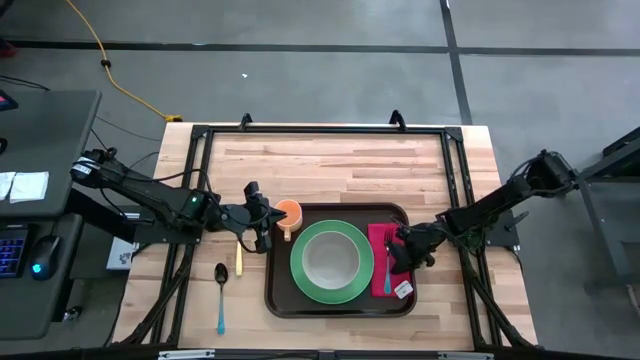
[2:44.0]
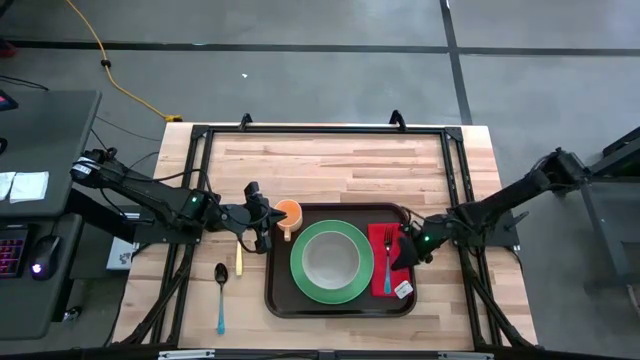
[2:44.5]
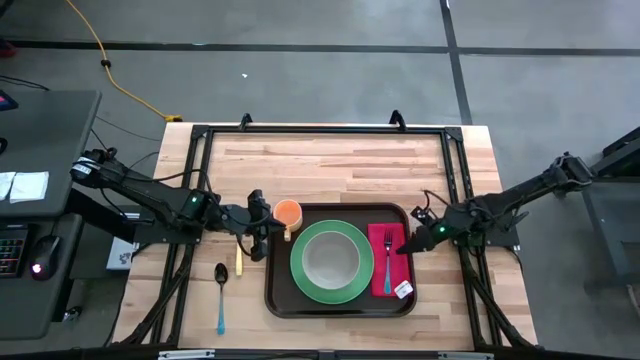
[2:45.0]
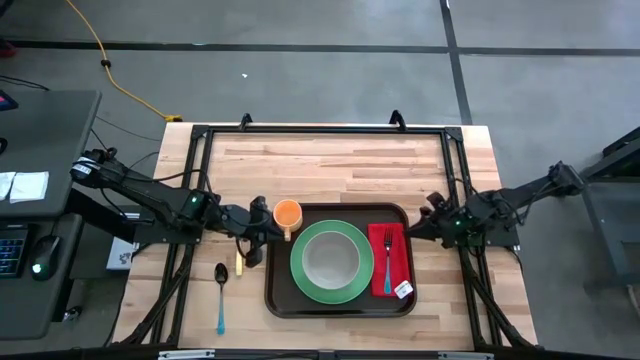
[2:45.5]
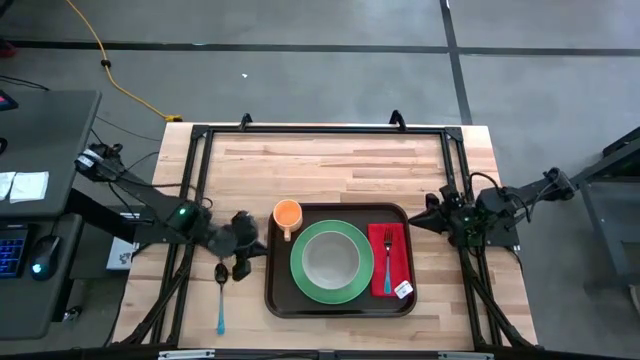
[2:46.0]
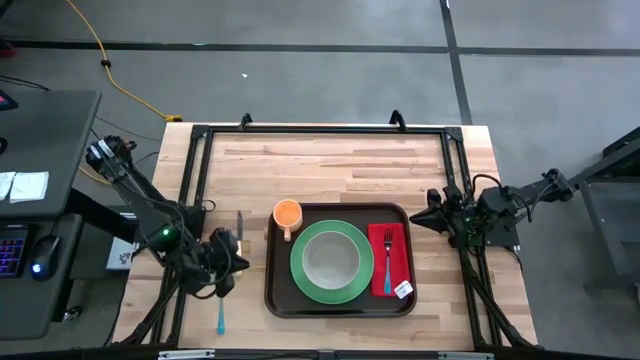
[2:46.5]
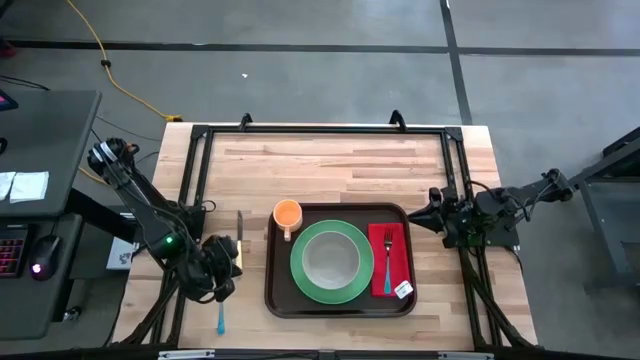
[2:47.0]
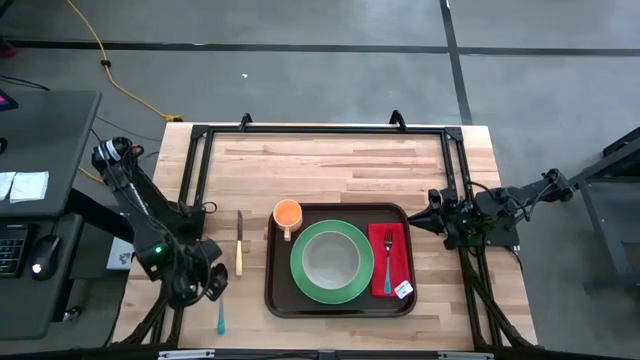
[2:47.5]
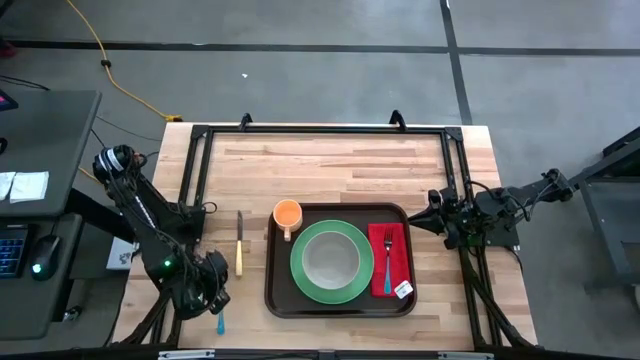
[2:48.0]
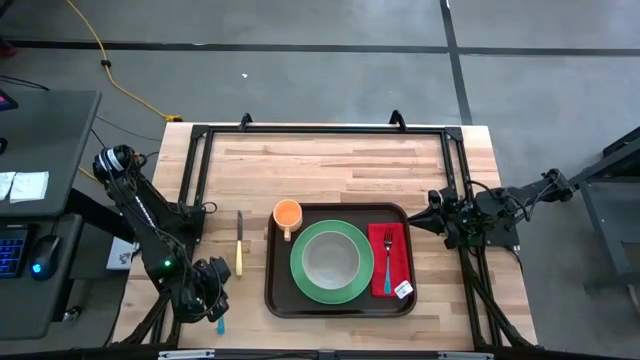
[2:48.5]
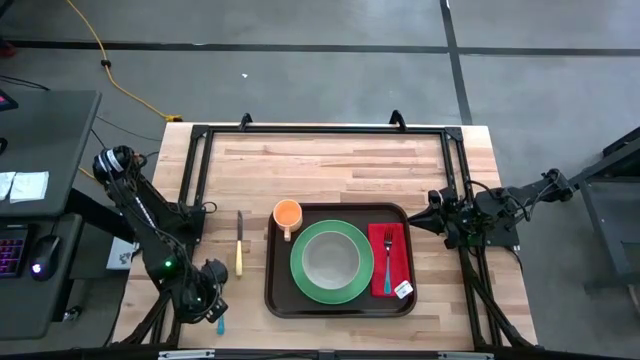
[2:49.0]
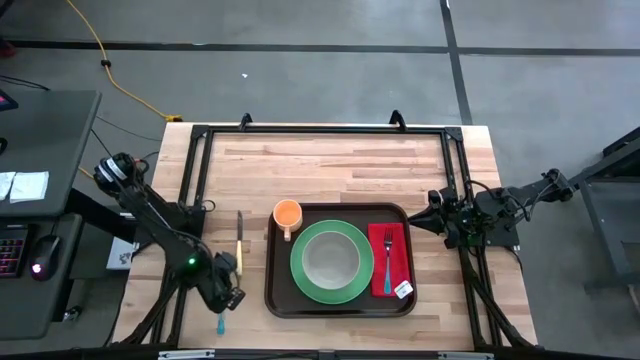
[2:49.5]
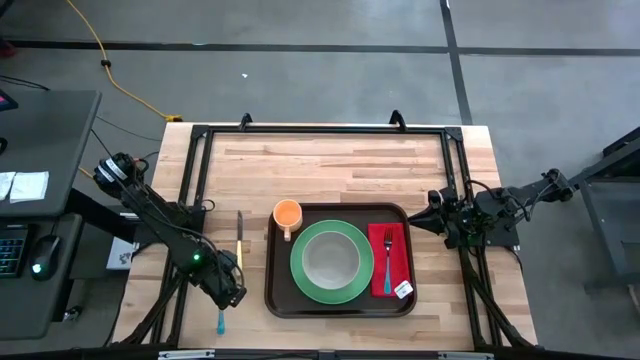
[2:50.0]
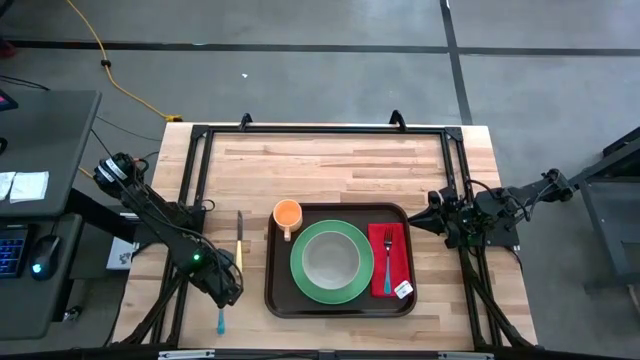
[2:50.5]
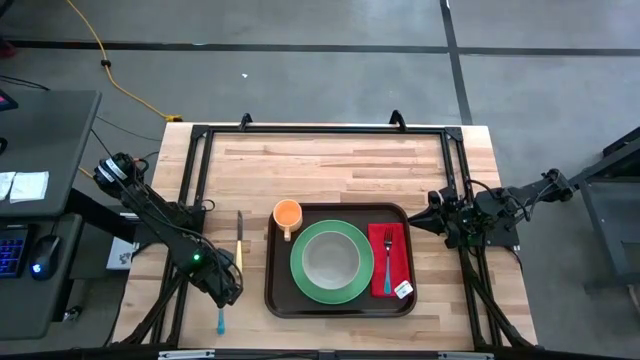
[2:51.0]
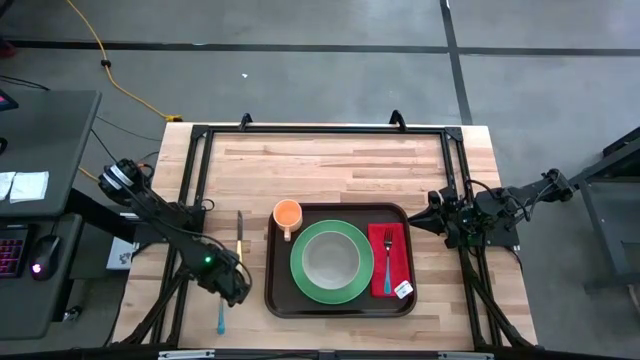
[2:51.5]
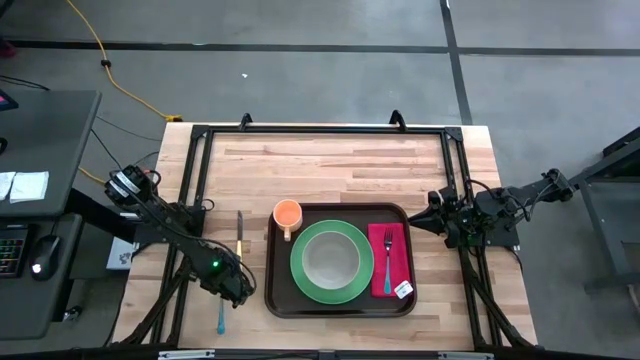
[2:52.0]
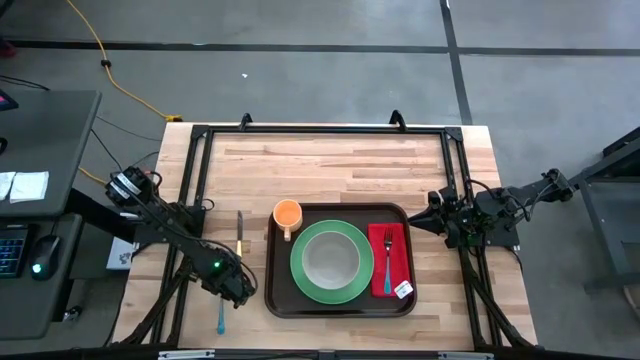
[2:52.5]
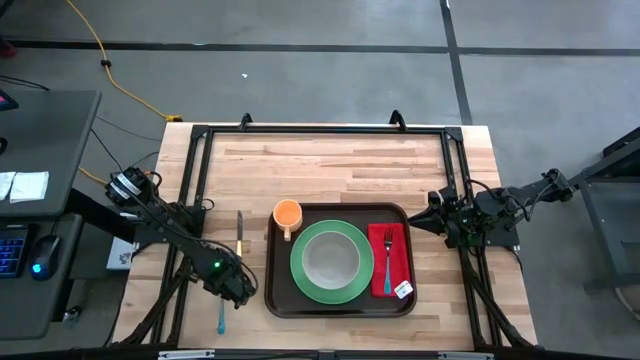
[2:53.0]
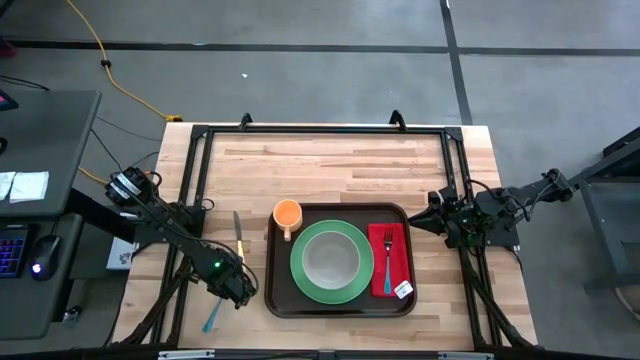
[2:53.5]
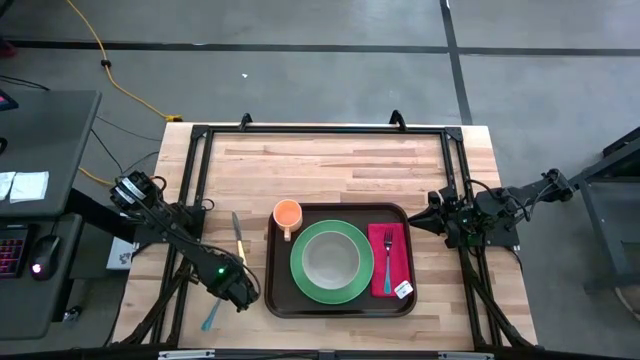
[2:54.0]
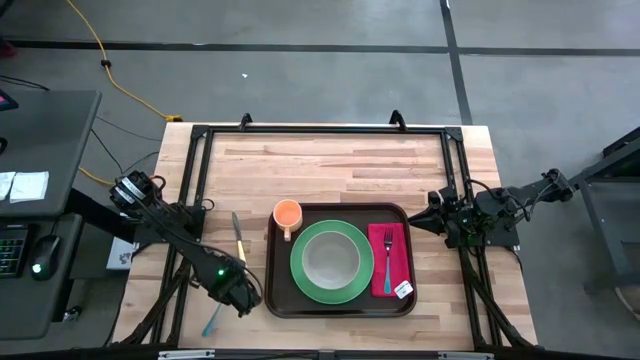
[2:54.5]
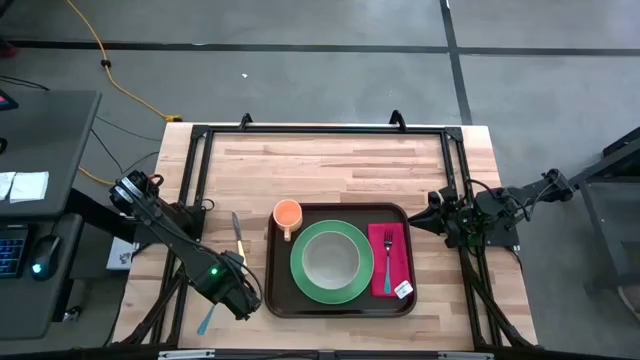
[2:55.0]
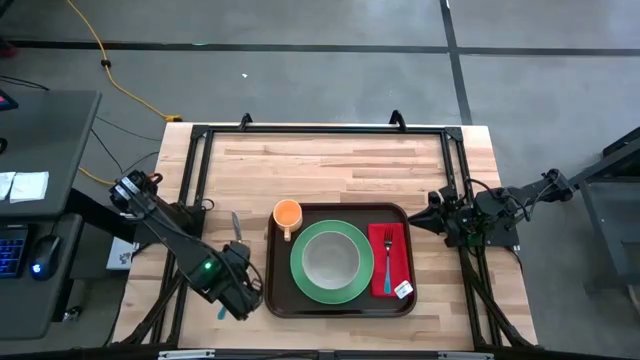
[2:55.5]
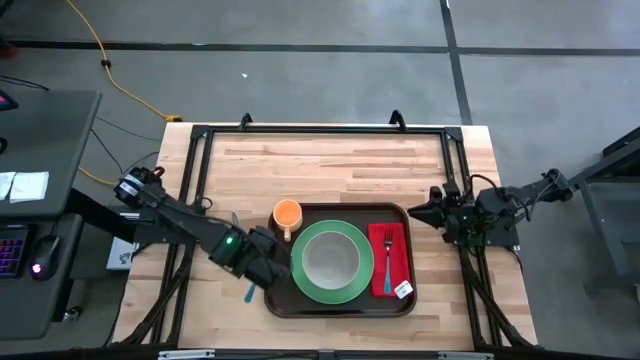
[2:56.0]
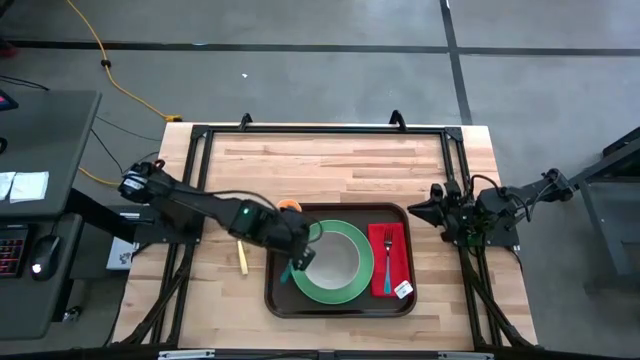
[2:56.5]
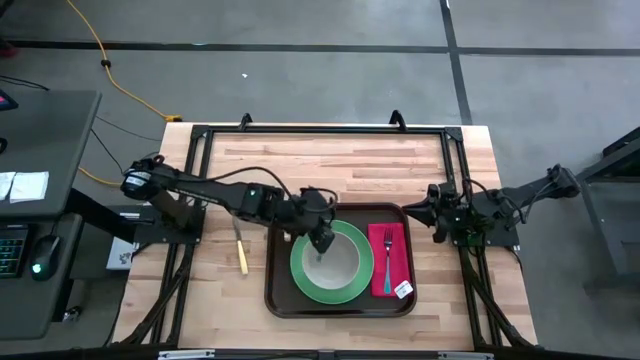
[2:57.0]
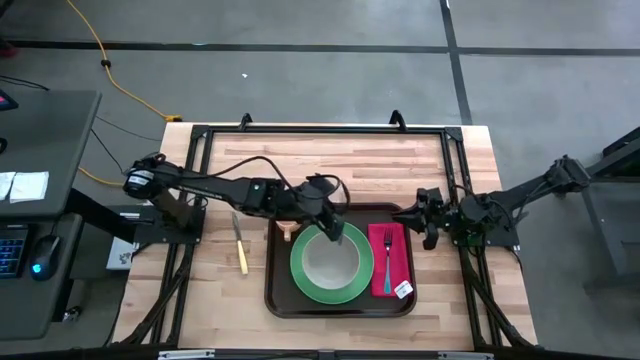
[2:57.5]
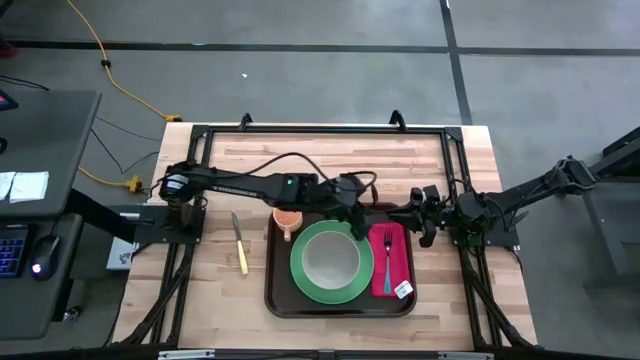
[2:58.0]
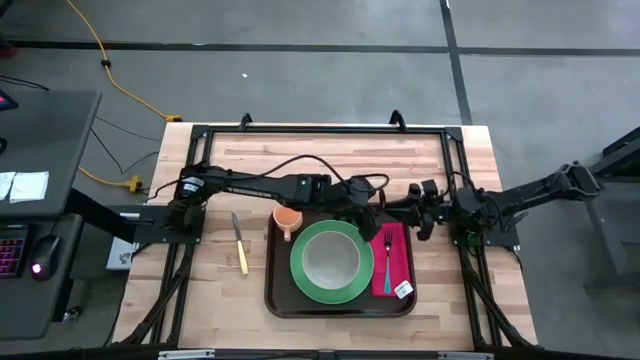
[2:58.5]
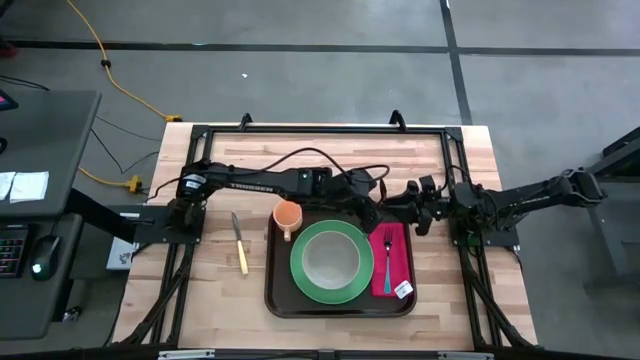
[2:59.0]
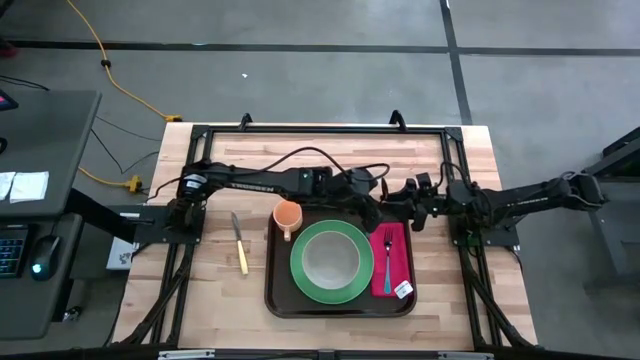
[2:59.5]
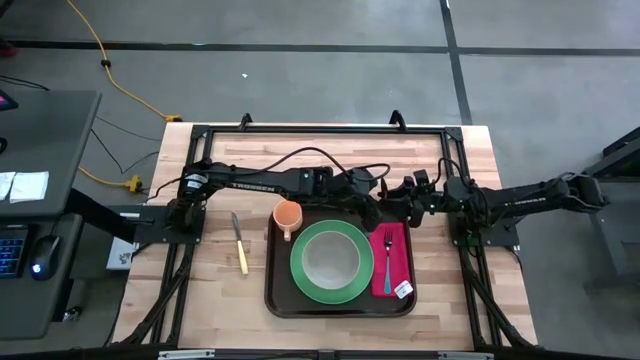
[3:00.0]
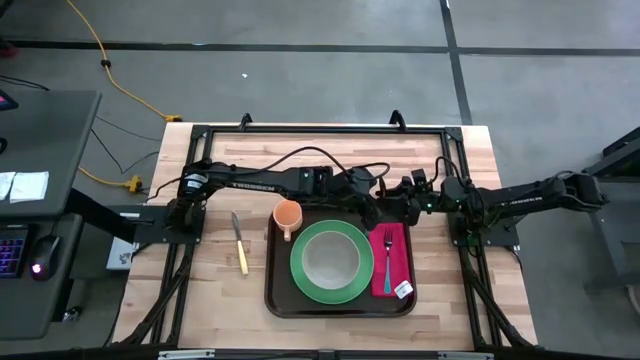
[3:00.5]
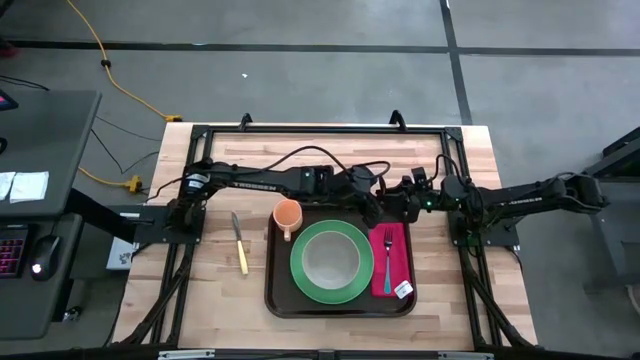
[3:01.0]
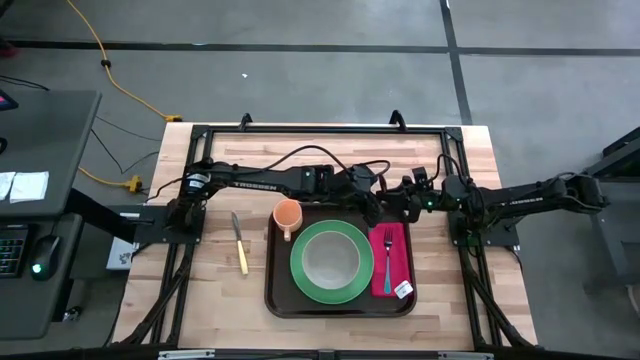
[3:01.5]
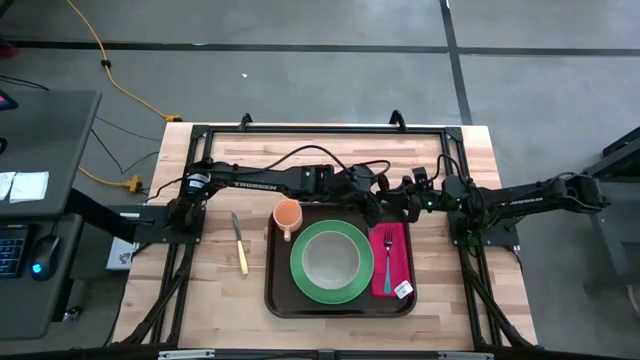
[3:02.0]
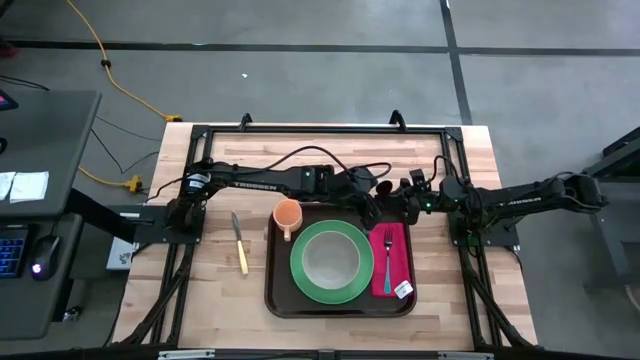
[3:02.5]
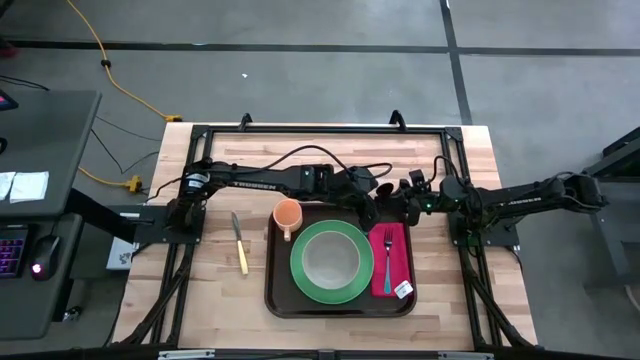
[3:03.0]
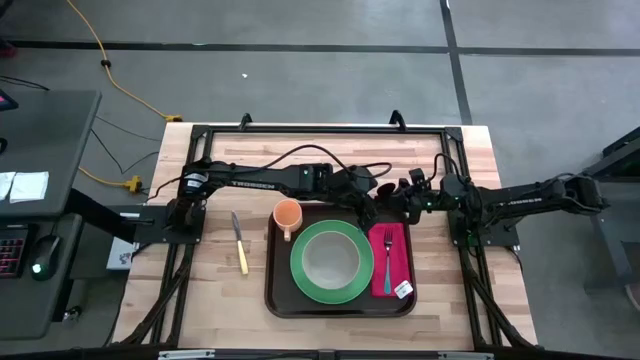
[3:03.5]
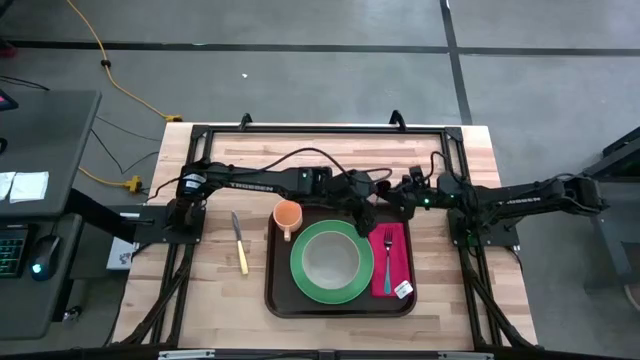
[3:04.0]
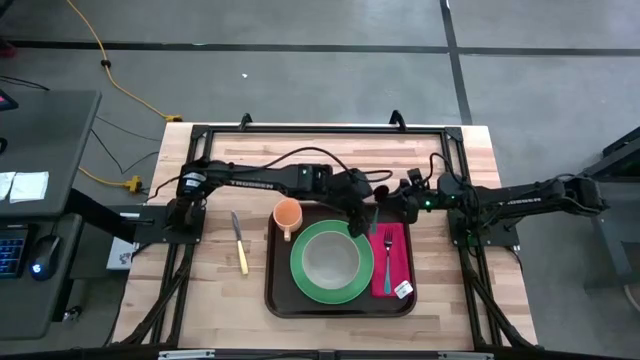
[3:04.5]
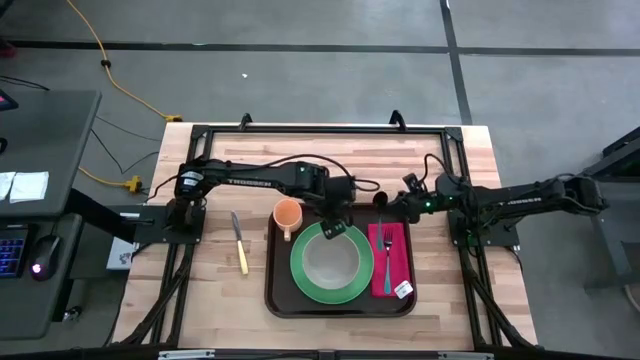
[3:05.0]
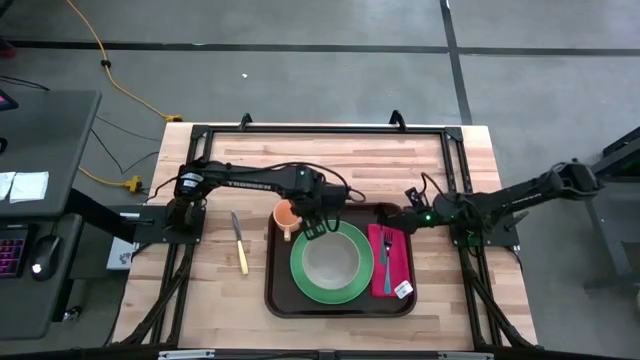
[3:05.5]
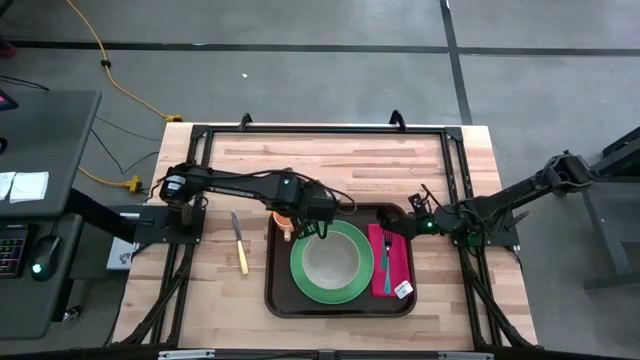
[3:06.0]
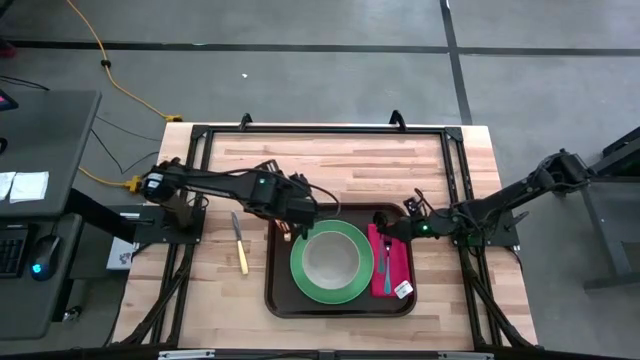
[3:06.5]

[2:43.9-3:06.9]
Task: Set up tray
Put the blue spoon to the left of the blue fork on the red napkin
